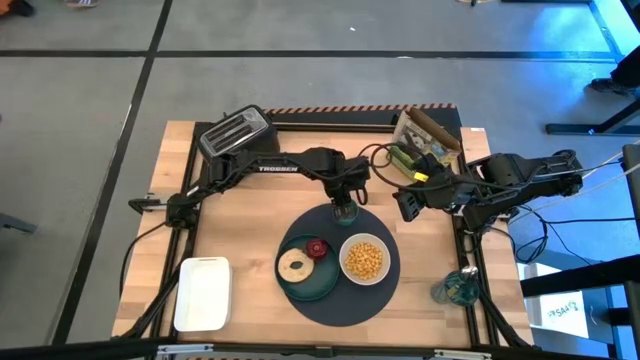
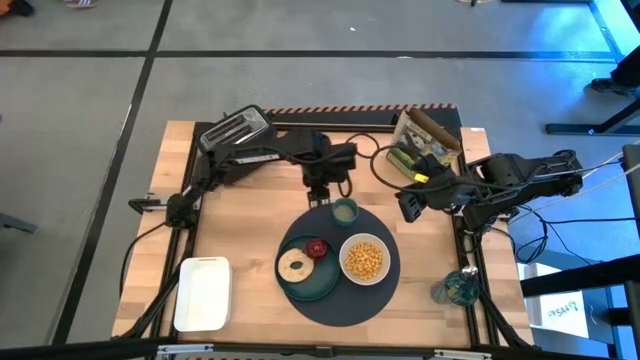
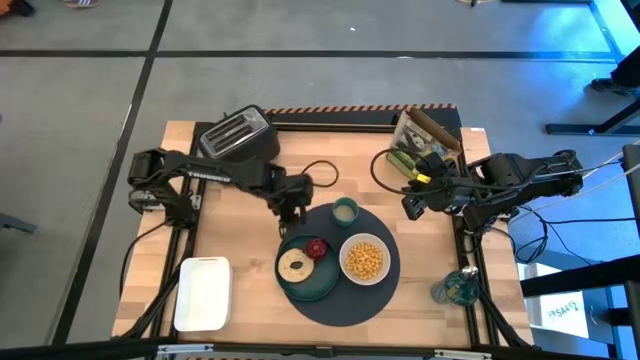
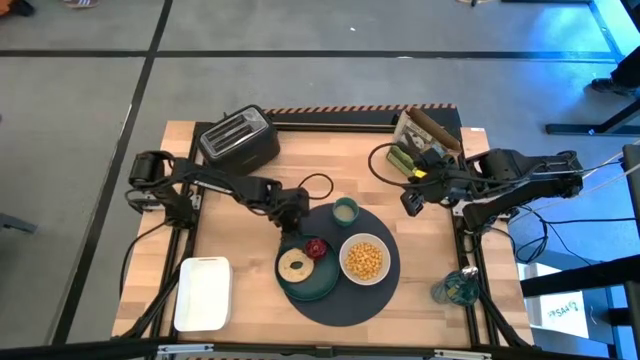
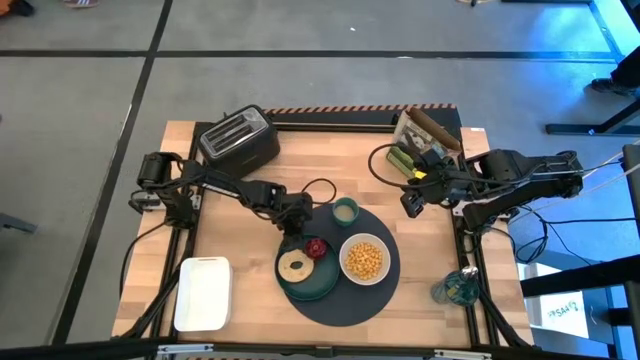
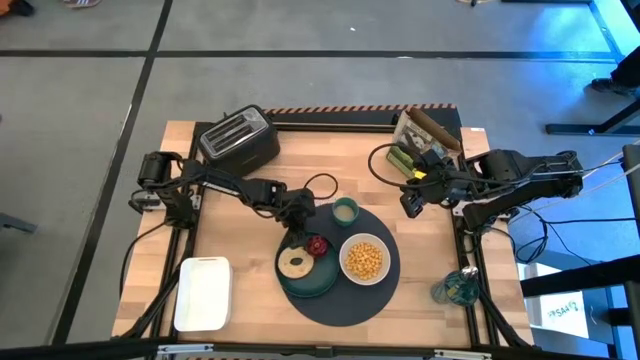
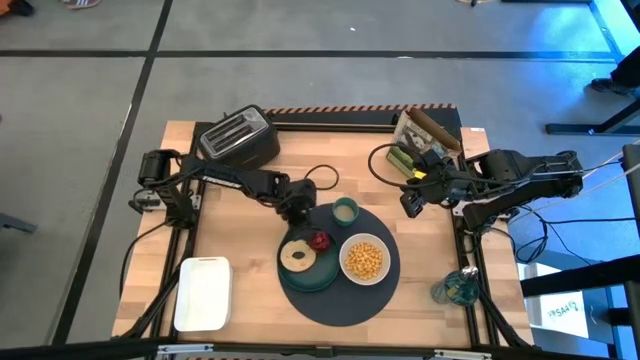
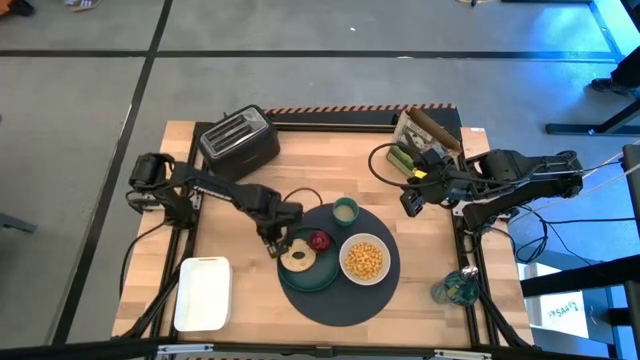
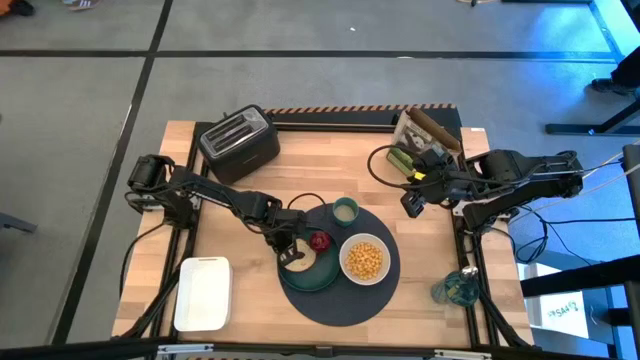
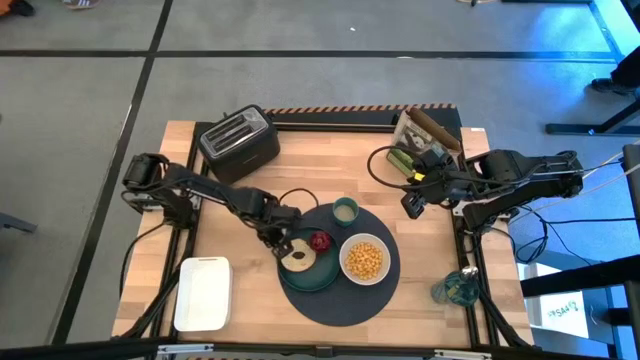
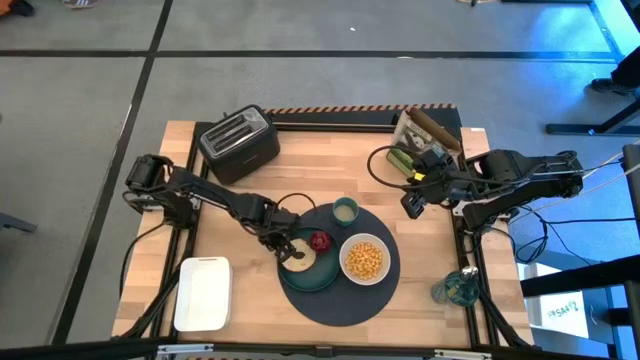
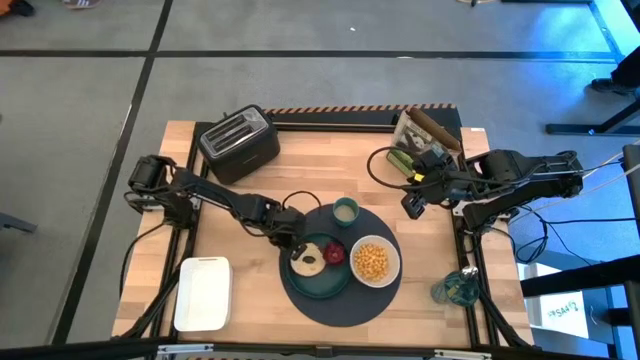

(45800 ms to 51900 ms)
Task: Arrange a breakfast setting
Adjust the green plate

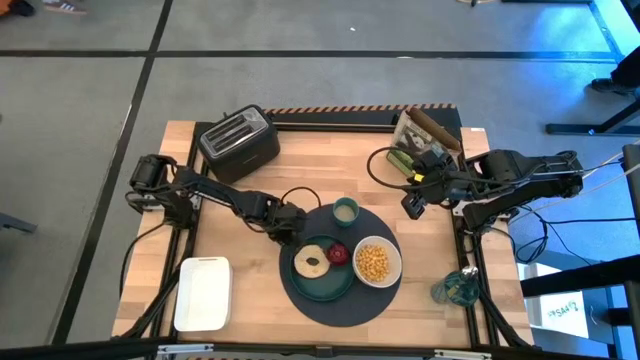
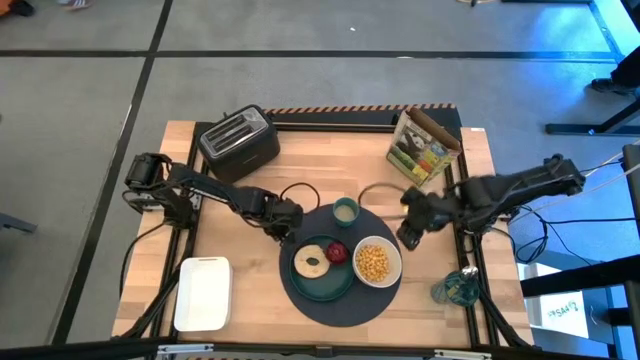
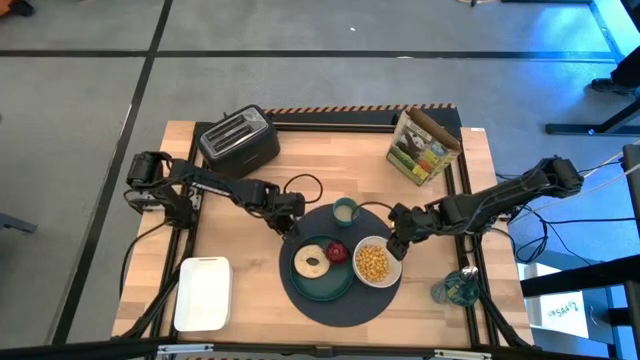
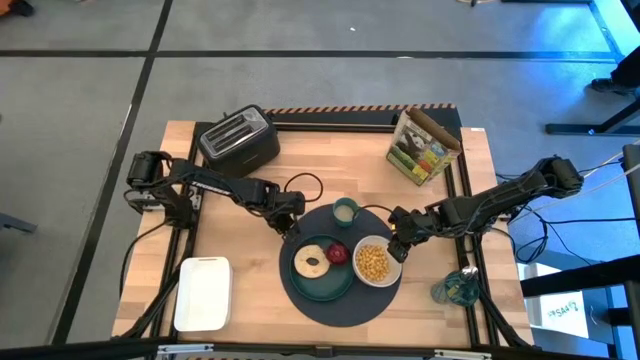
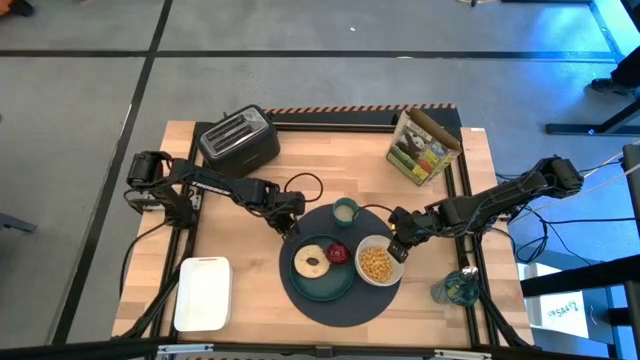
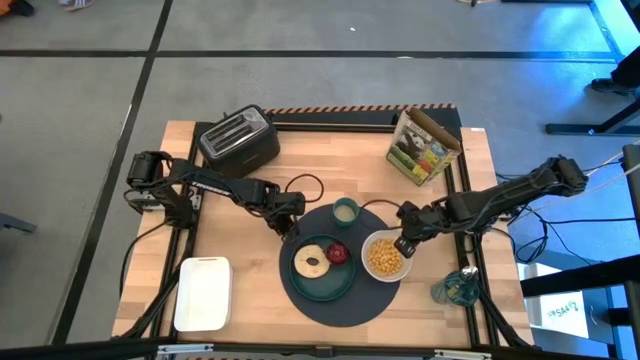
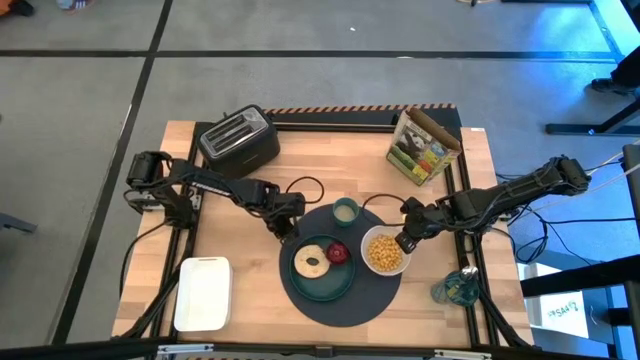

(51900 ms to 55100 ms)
Adjust the white bowl

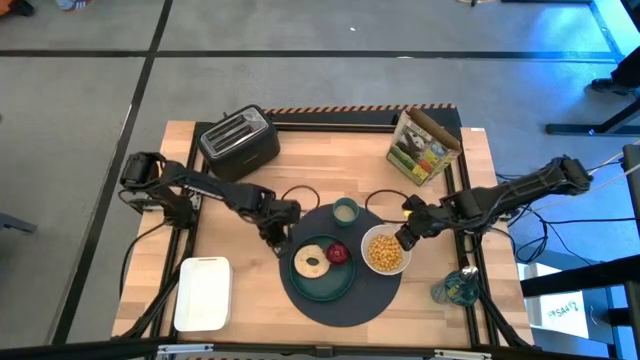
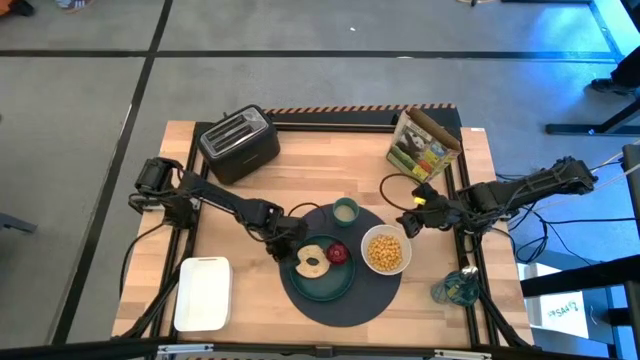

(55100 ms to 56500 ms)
Adjust the green plate

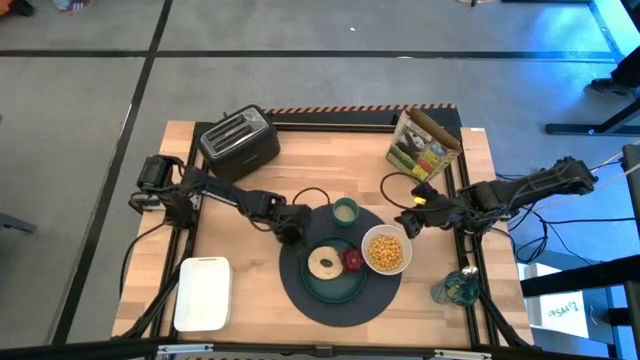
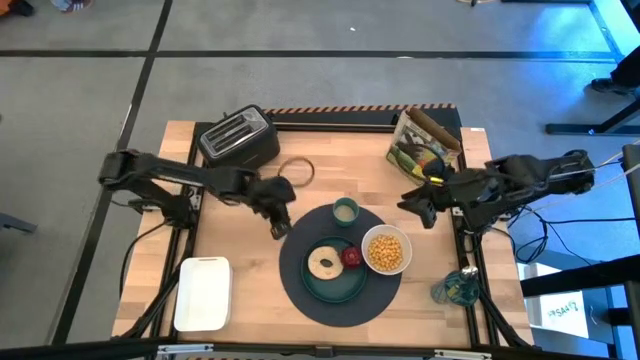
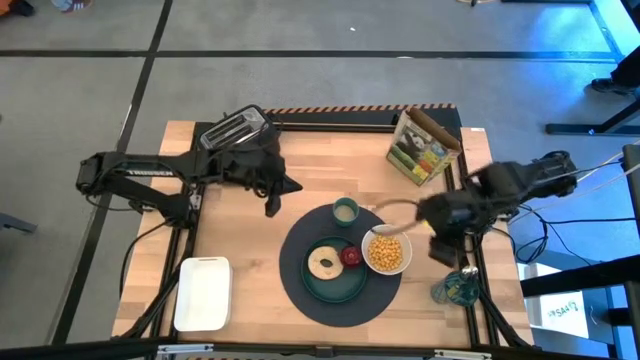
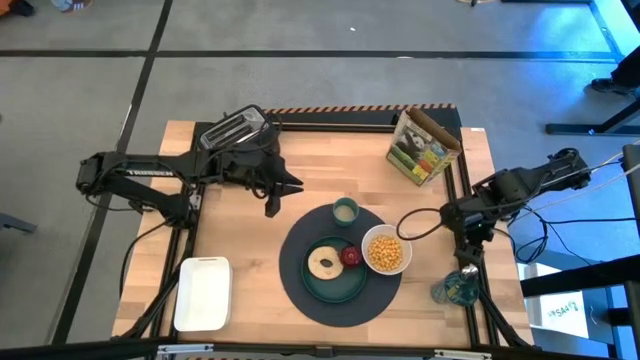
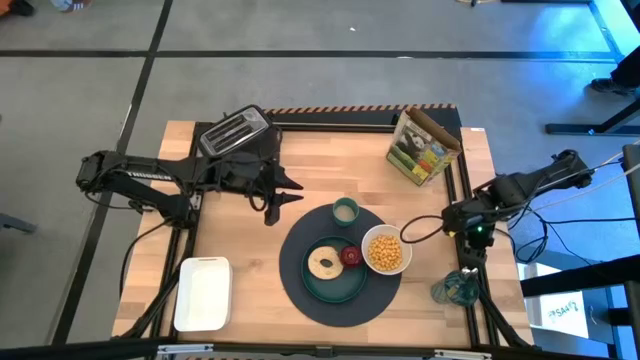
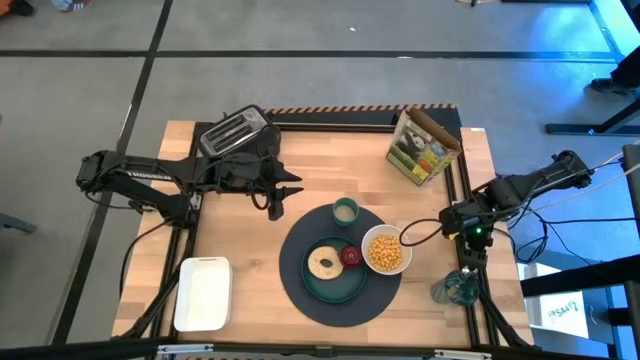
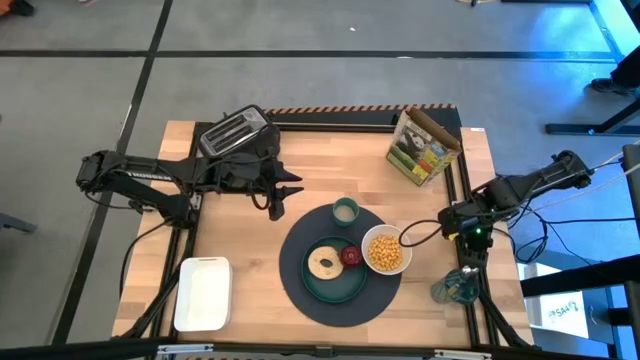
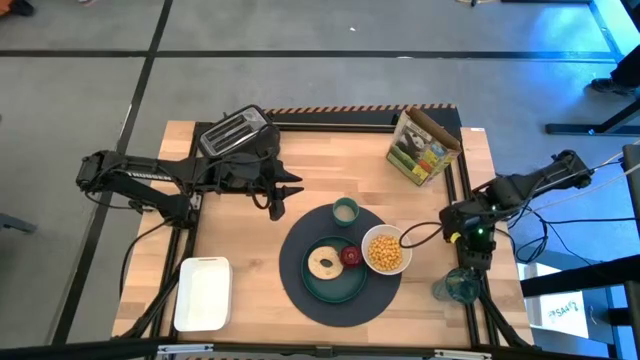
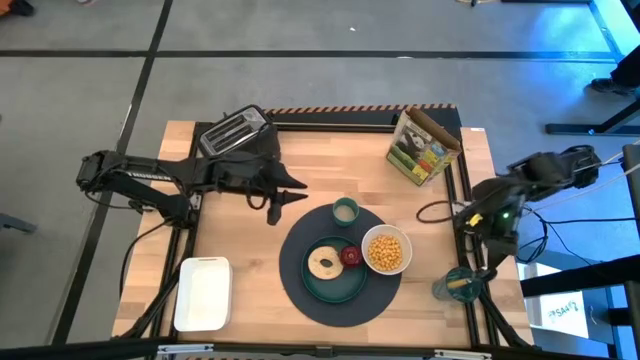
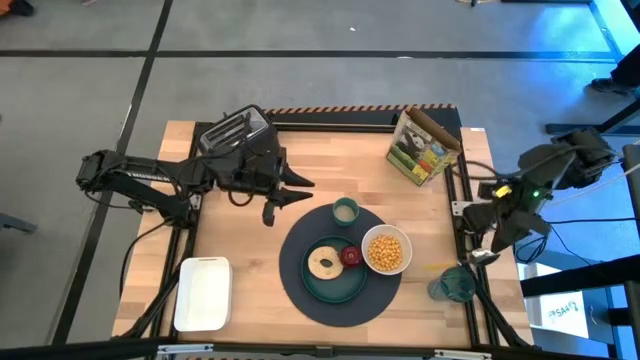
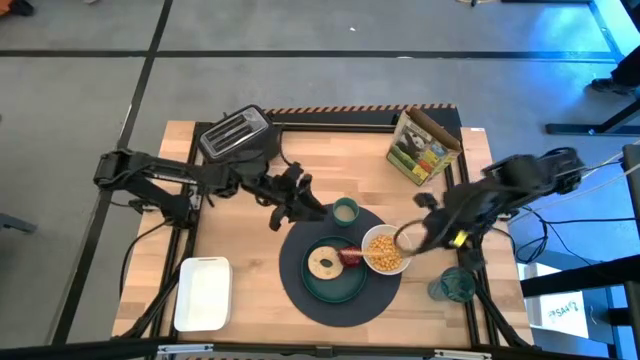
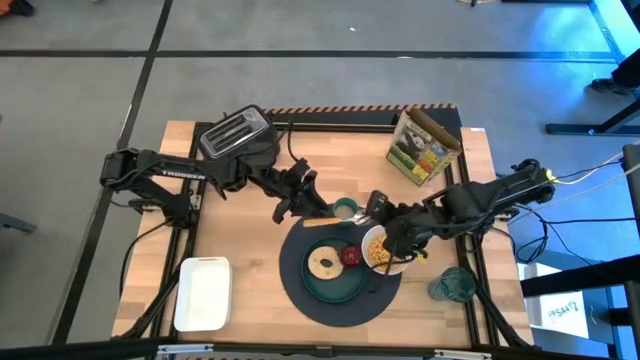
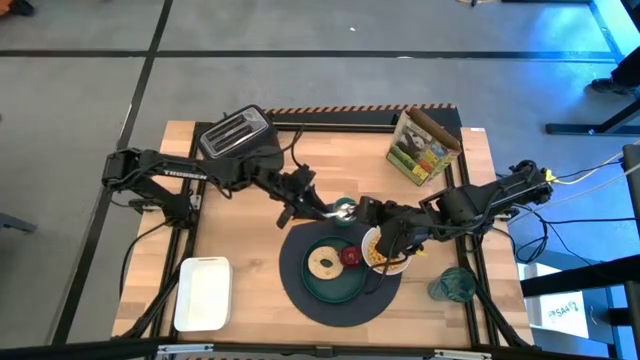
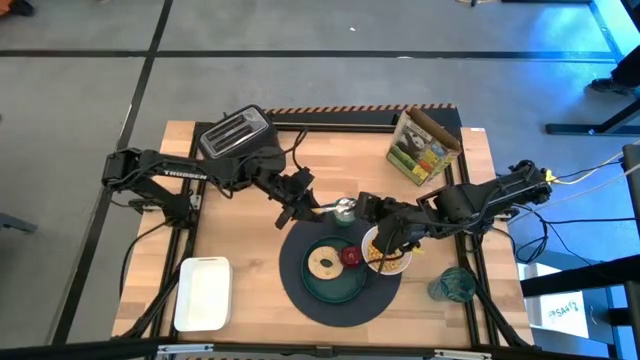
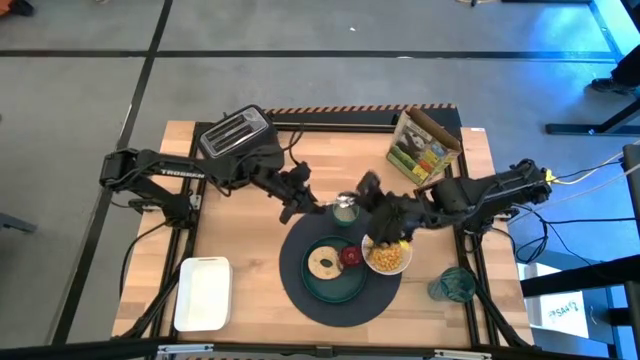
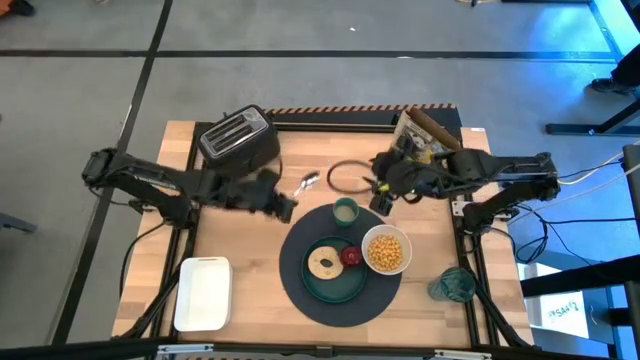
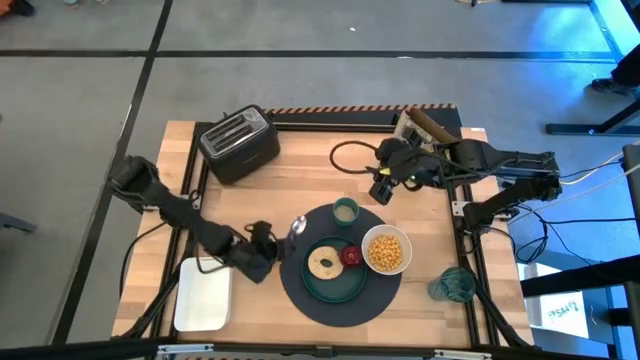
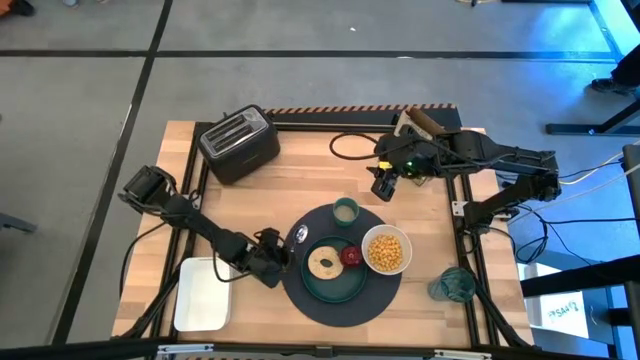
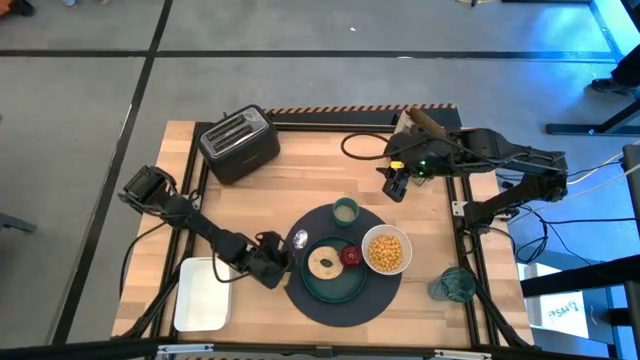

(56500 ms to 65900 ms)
Put the spoon on the dark blue placemat to the left of the green plate

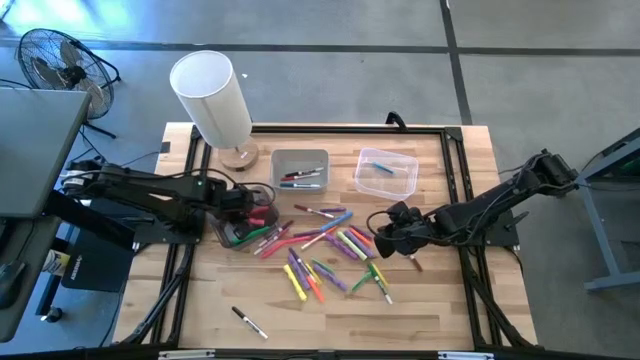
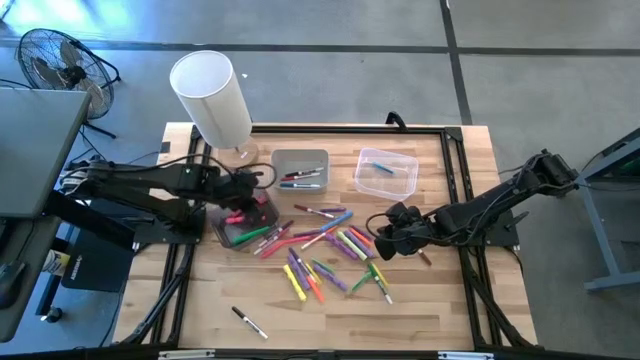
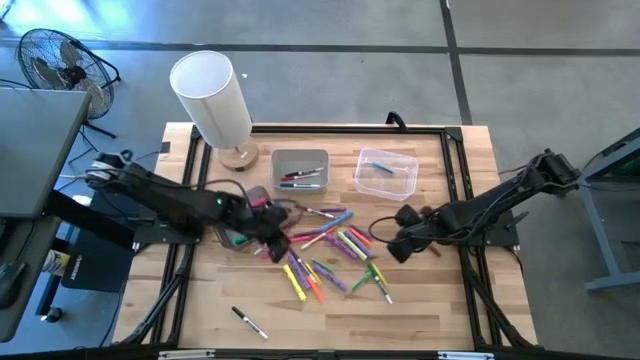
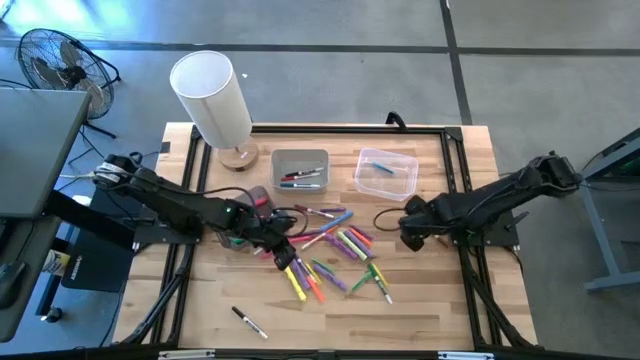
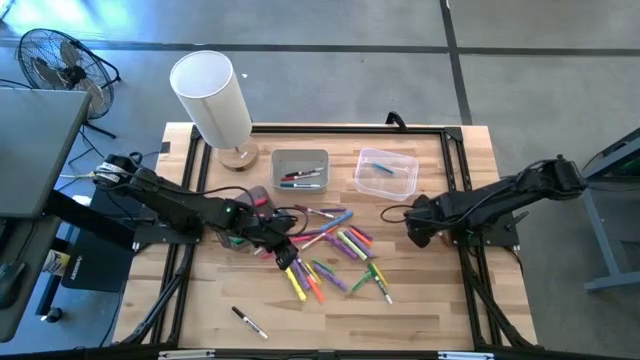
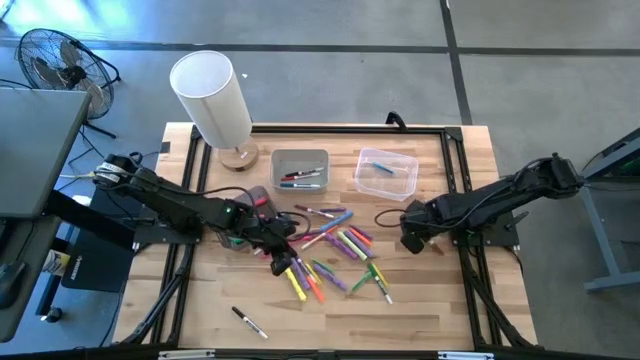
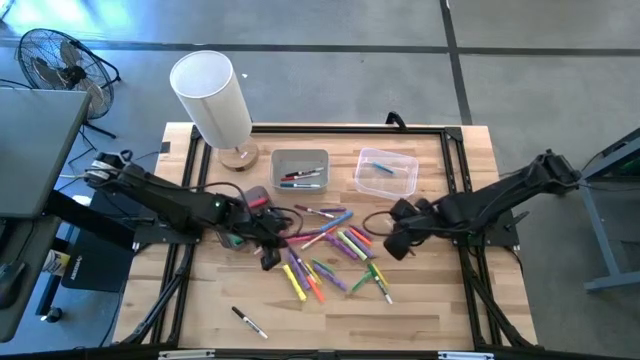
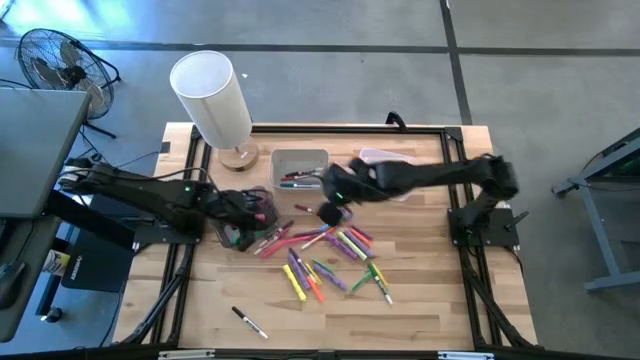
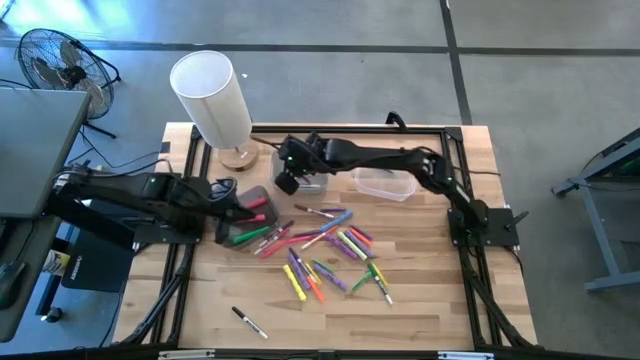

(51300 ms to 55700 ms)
Task: Pick & Place Markers
Put the brown marker pen into the white bin
